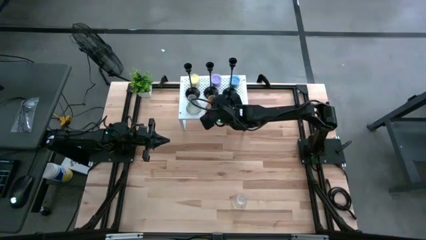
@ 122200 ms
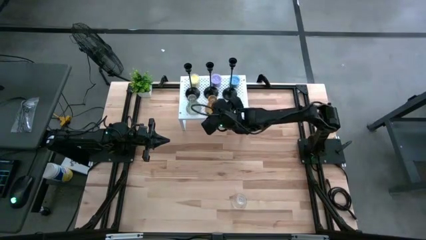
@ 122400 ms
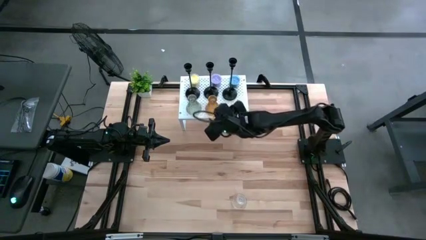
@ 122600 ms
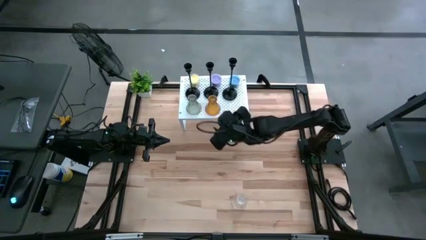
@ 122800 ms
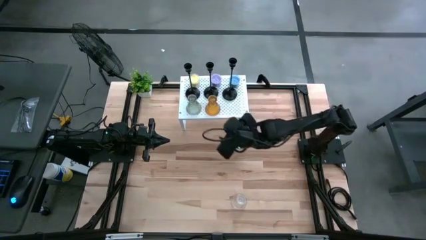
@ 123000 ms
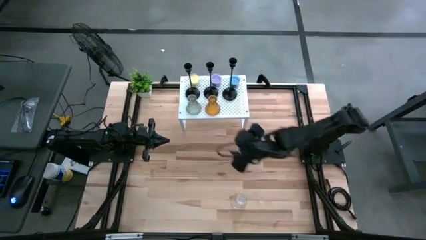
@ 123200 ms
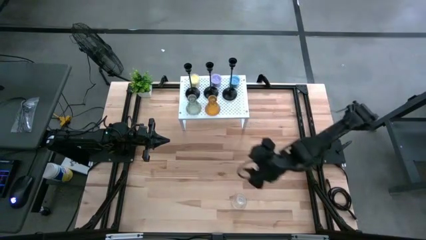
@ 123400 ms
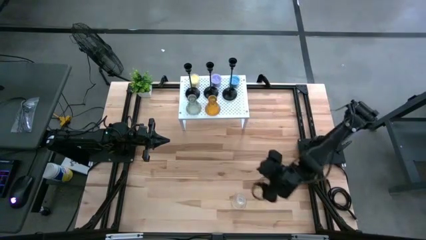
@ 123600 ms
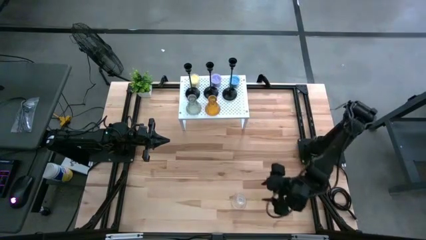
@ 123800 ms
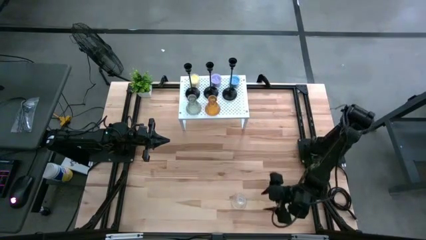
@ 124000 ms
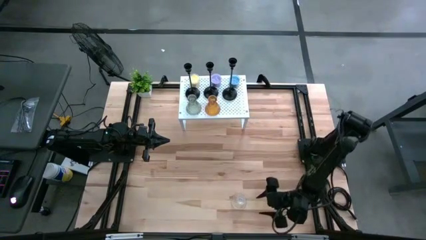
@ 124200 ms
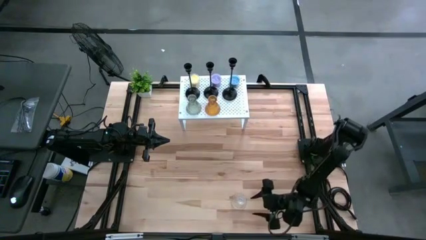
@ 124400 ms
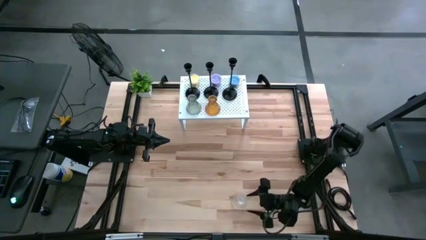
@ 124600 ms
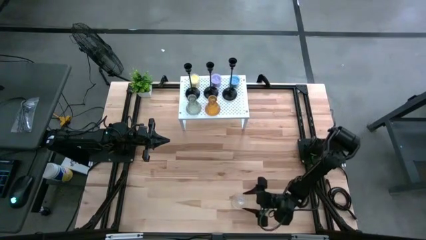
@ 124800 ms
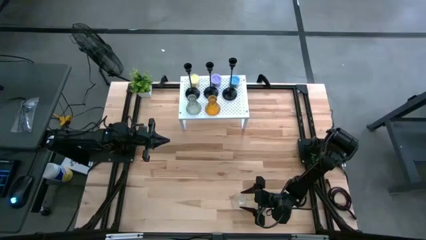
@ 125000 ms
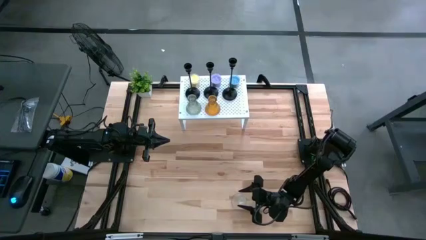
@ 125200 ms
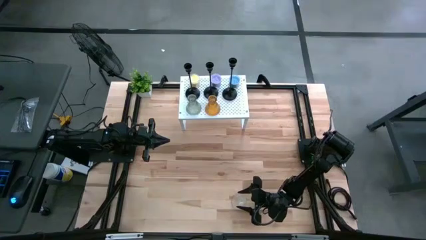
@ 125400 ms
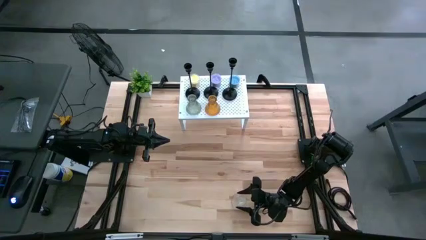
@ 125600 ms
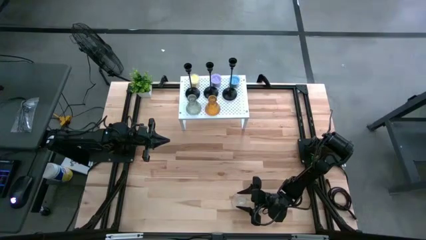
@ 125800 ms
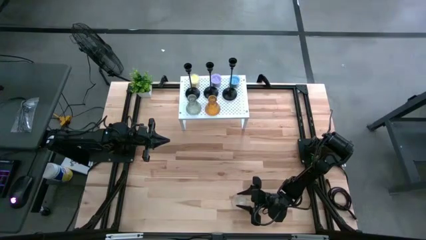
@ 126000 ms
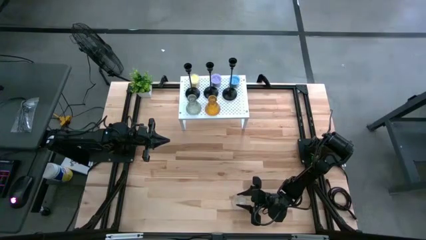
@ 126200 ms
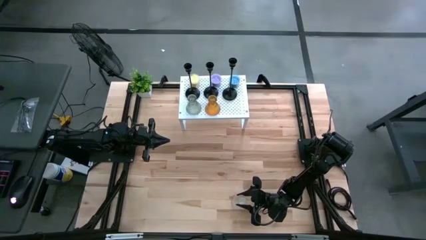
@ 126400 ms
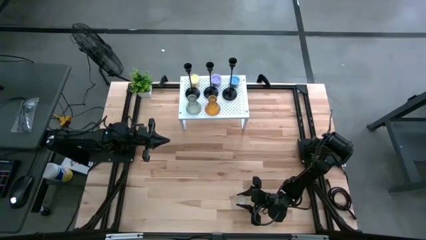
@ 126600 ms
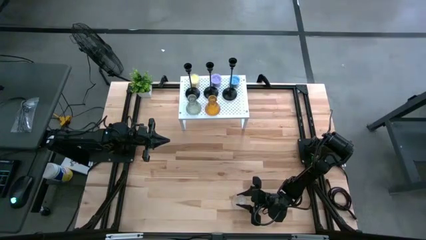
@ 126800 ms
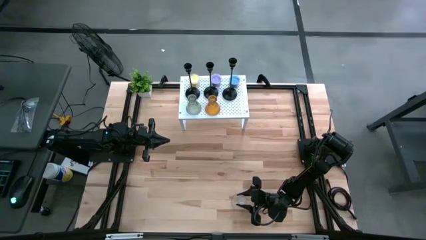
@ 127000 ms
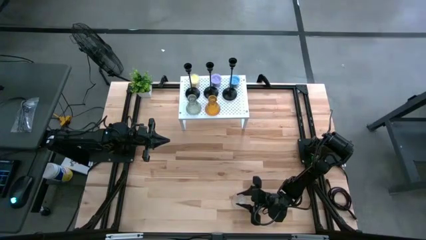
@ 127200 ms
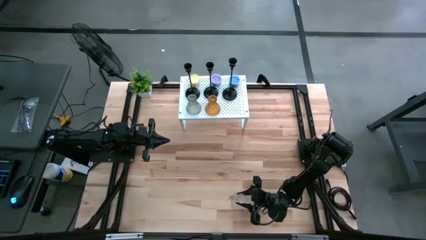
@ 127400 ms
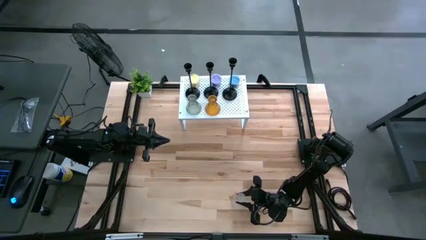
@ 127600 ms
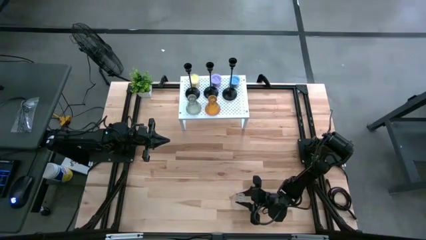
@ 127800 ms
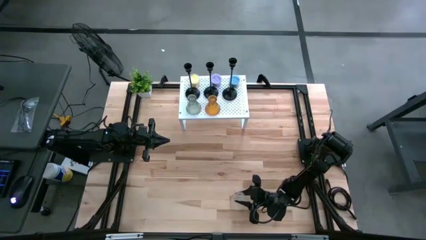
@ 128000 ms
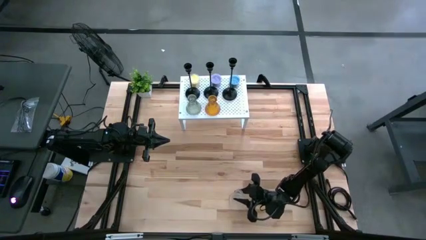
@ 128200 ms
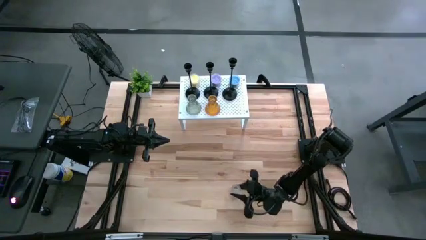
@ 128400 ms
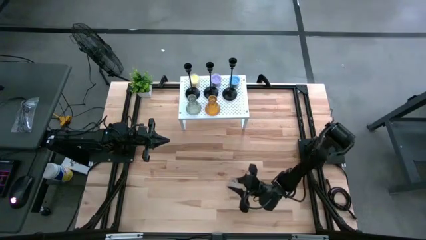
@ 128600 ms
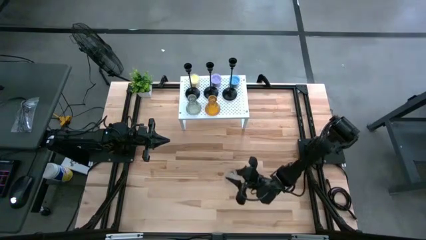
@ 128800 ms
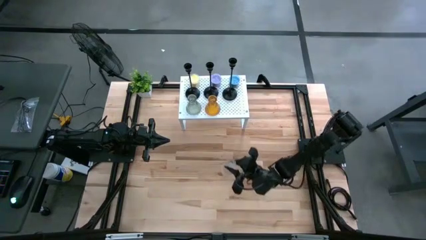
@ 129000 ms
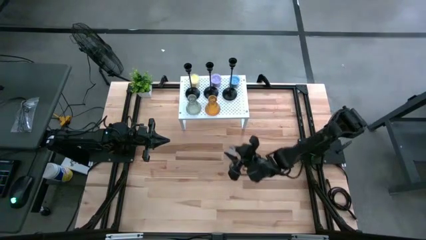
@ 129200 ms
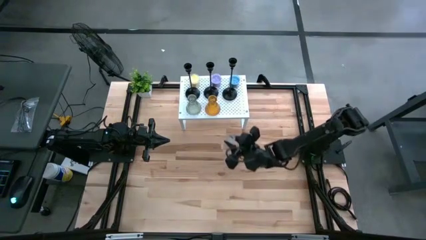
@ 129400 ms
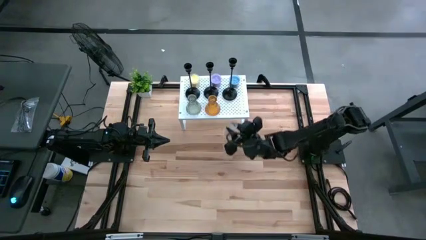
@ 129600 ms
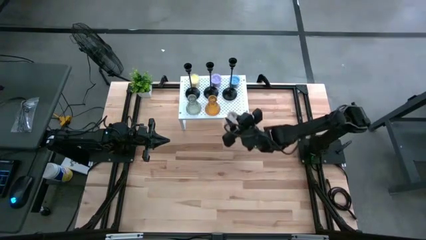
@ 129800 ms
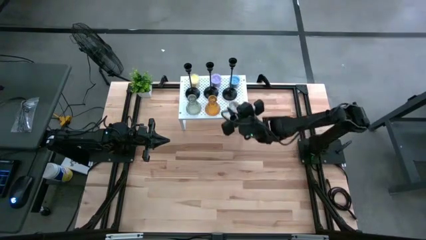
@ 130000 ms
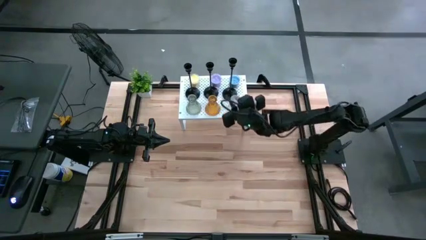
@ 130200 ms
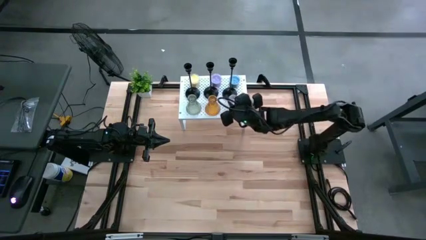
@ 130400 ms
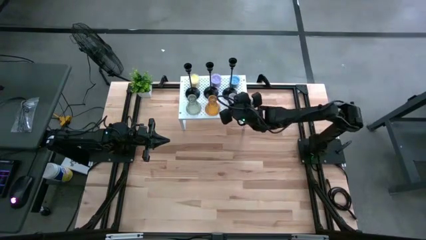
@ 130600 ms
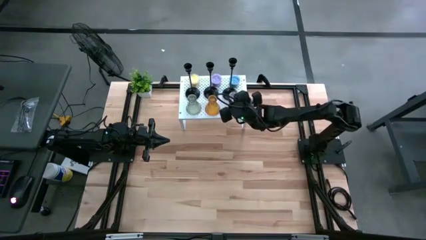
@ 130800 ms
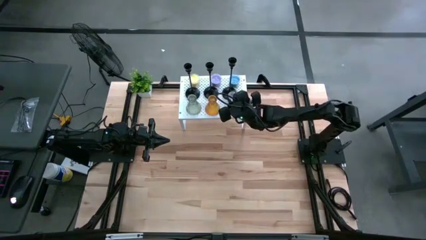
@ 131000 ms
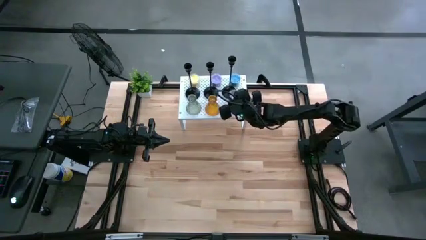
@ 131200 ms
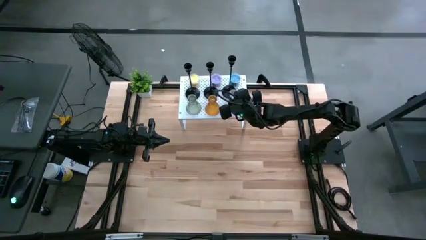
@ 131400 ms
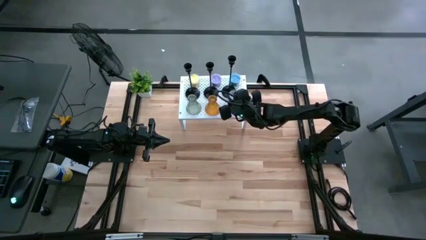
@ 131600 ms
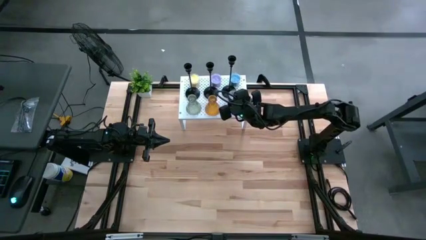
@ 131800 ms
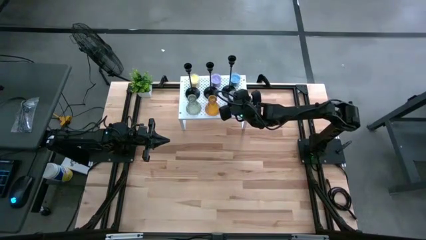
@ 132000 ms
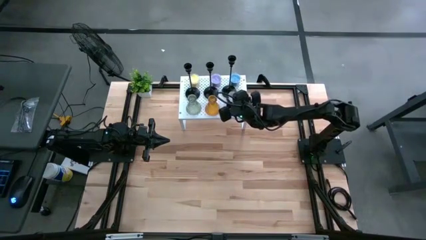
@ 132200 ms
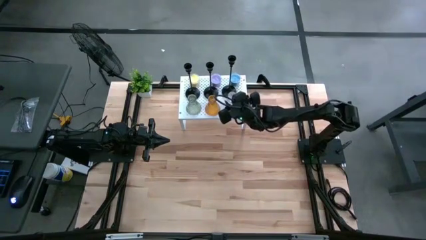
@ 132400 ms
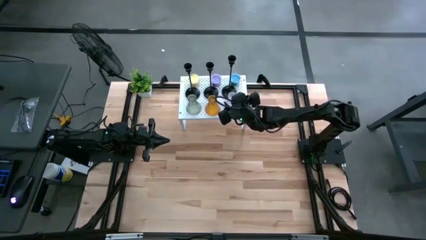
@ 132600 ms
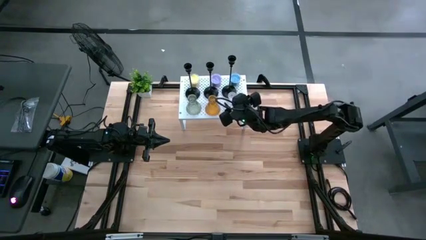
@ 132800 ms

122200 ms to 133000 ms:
Task: Pick & Place candle stick holders
Put the transparent glass candle holder on the shelf

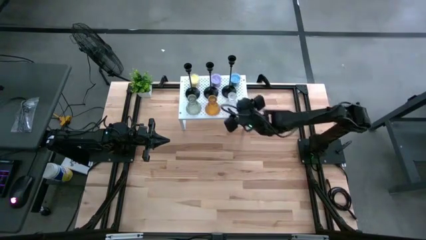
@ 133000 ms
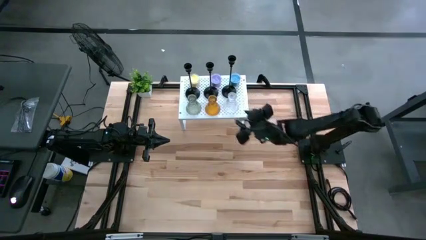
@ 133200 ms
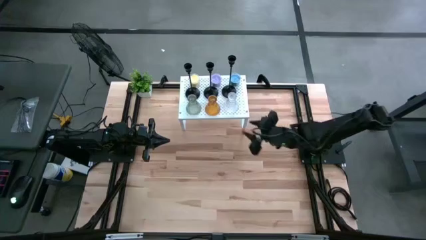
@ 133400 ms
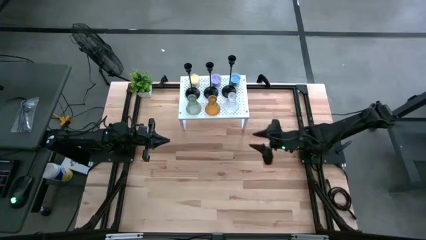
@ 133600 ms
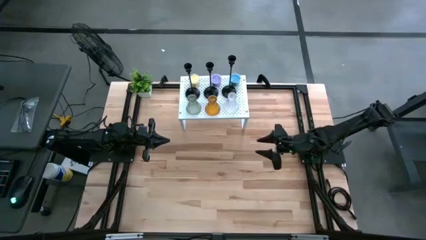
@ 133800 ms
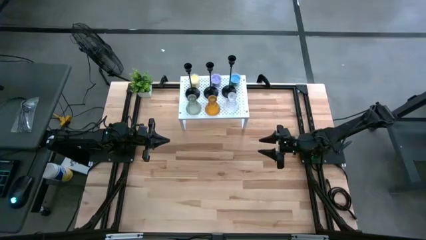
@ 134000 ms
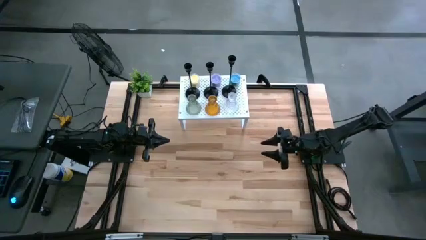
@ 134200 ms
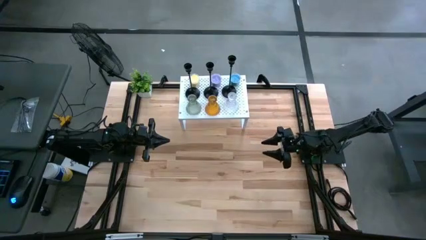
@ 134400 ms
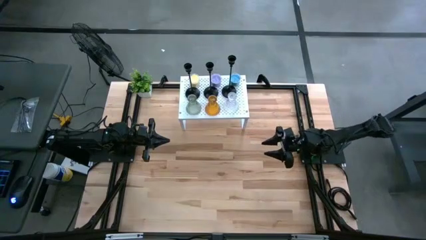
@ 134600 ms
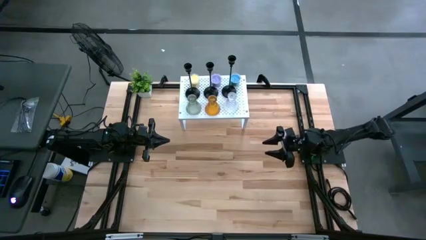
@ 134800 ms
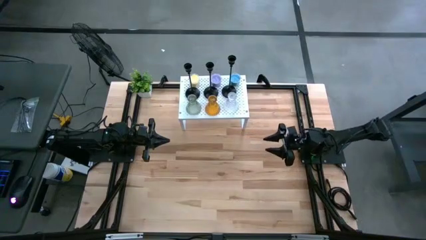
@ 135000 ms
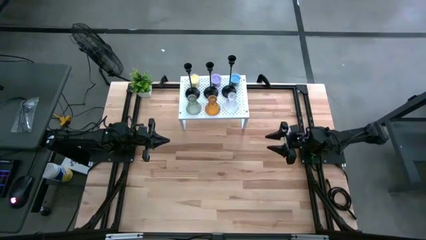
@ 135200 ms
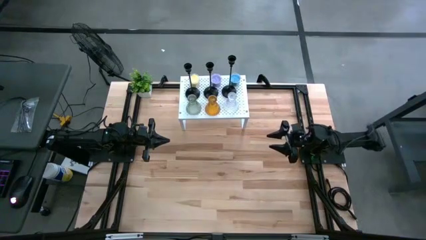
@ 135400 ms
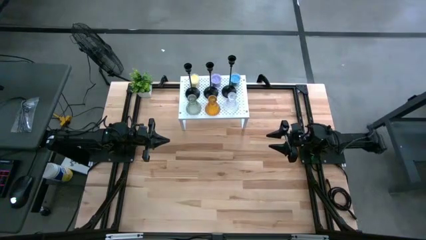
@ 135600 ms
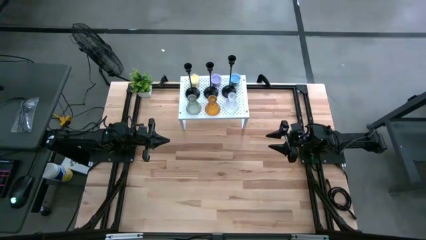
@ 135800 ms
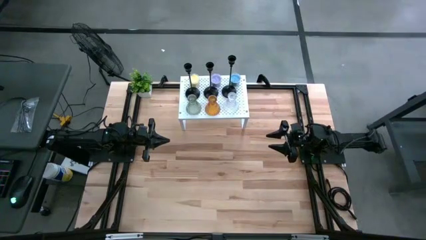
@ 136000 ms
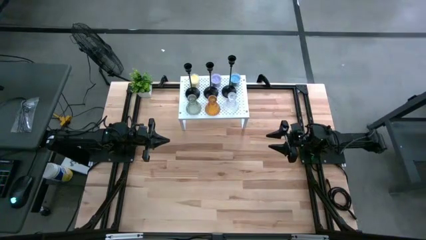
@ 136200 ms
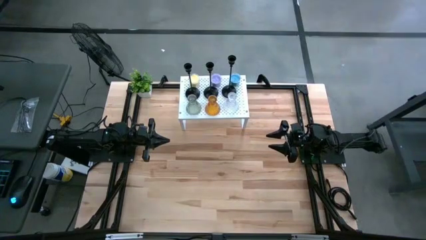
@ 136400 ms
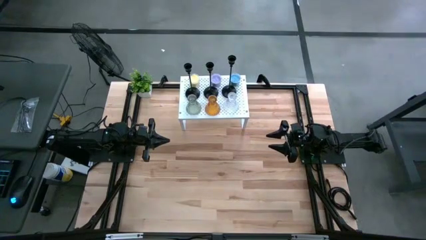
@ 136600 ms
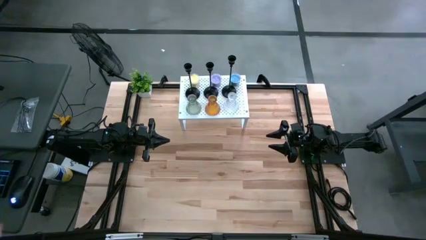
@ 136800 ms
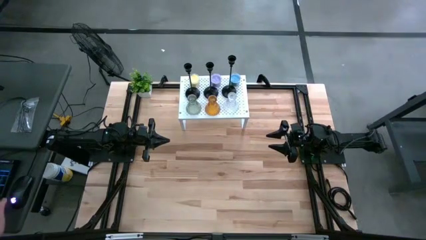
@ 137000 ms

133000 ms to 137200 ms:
Return to Home Position
